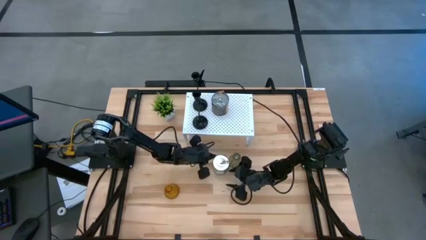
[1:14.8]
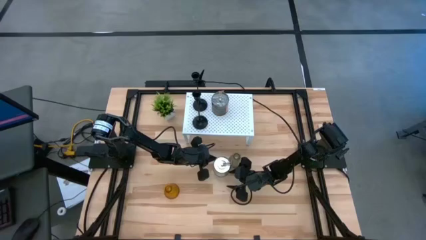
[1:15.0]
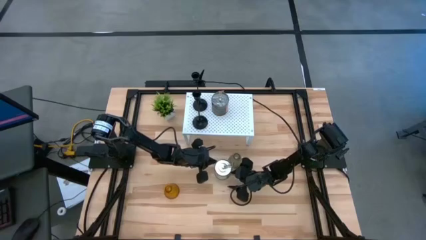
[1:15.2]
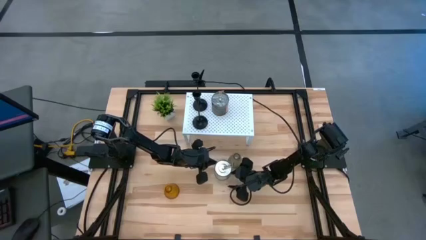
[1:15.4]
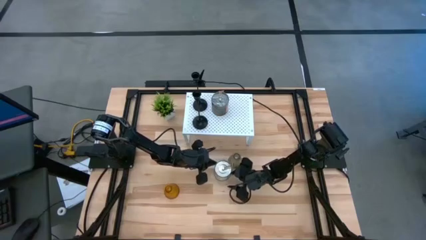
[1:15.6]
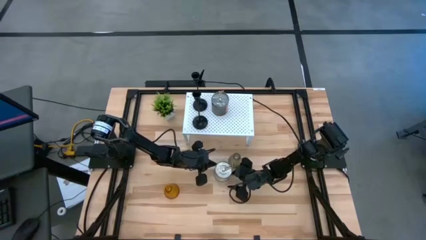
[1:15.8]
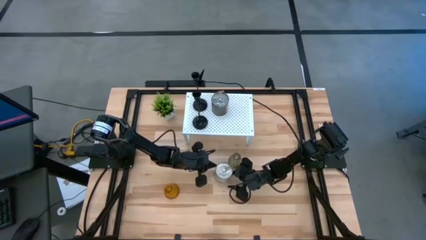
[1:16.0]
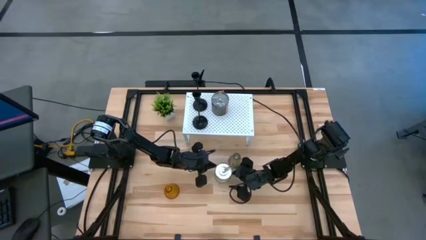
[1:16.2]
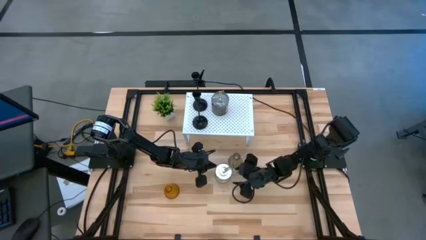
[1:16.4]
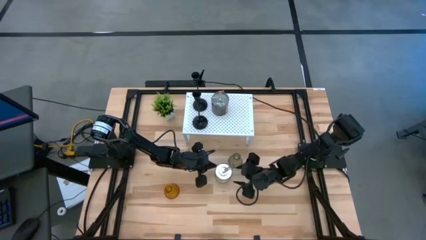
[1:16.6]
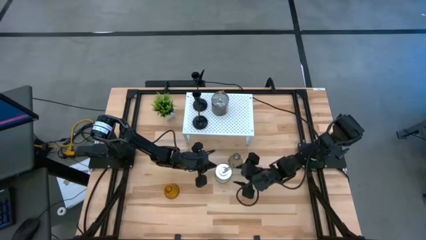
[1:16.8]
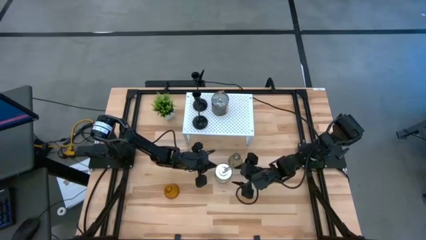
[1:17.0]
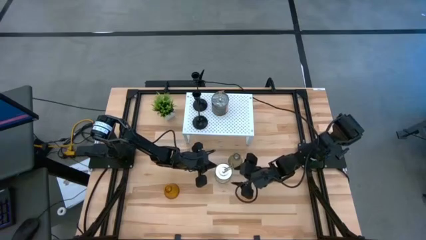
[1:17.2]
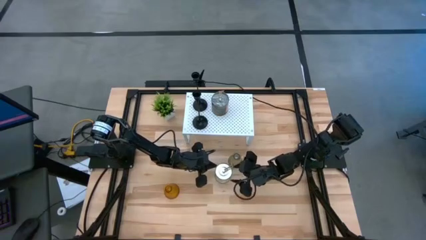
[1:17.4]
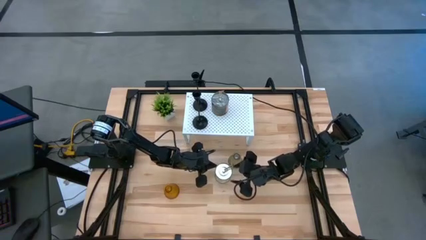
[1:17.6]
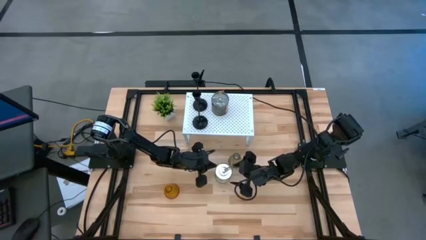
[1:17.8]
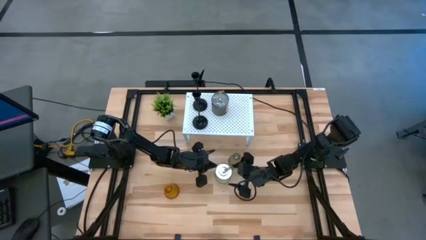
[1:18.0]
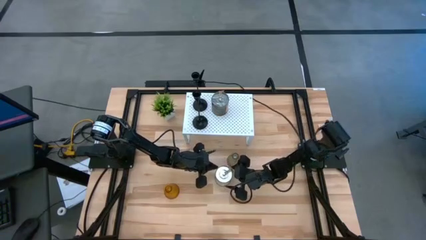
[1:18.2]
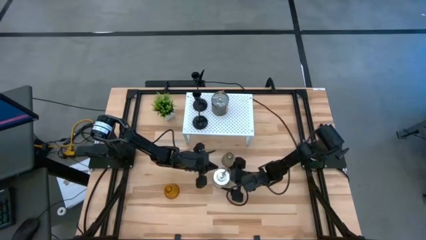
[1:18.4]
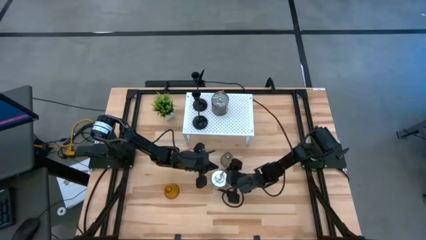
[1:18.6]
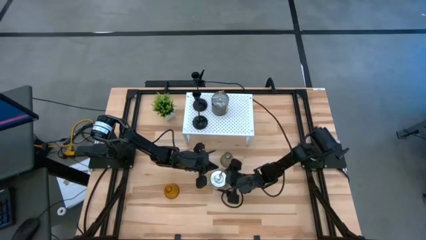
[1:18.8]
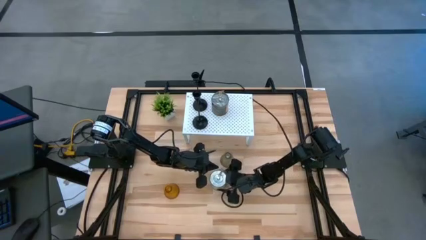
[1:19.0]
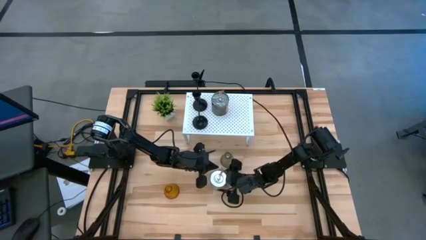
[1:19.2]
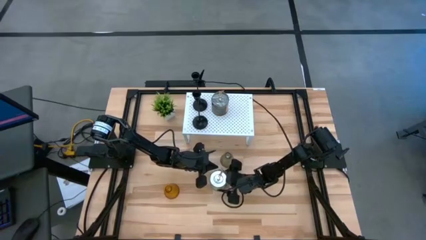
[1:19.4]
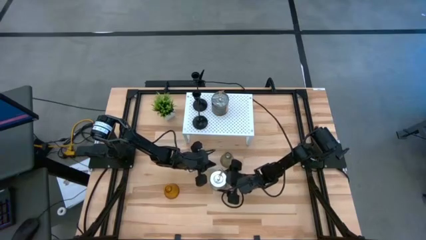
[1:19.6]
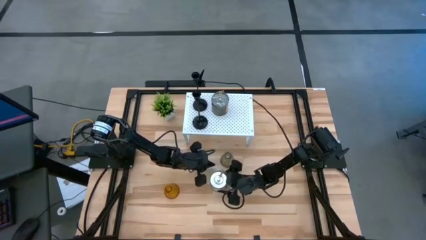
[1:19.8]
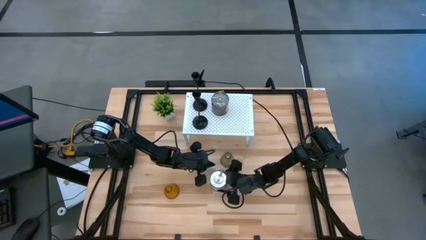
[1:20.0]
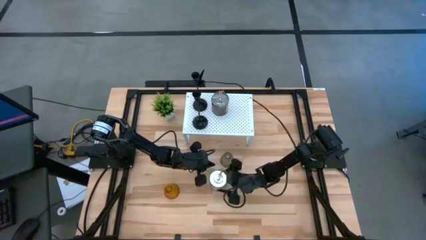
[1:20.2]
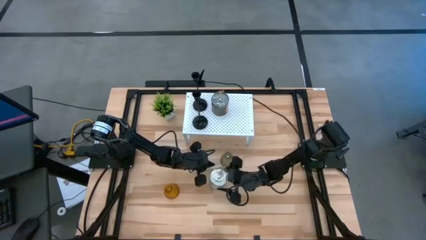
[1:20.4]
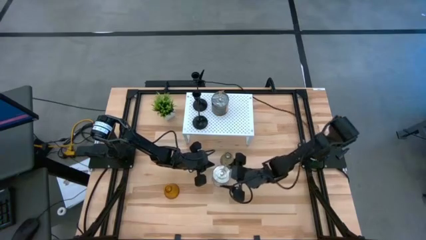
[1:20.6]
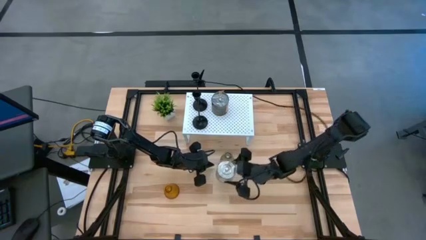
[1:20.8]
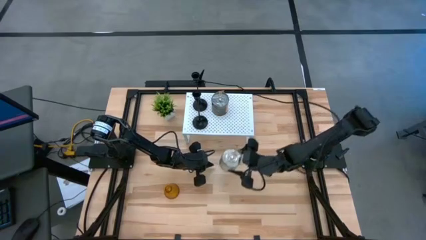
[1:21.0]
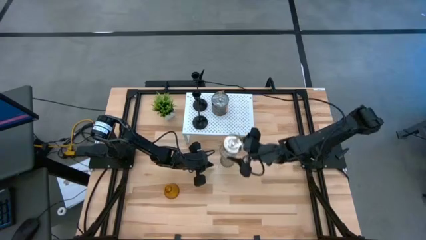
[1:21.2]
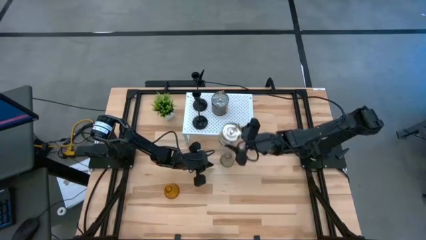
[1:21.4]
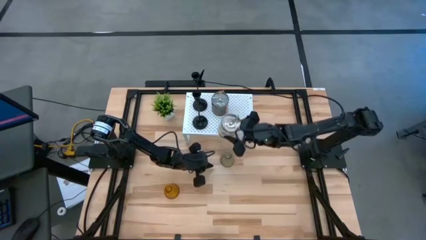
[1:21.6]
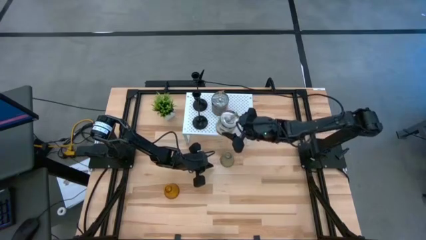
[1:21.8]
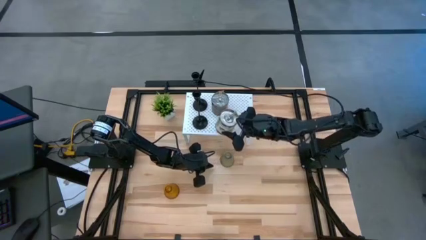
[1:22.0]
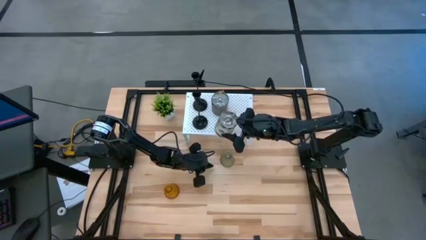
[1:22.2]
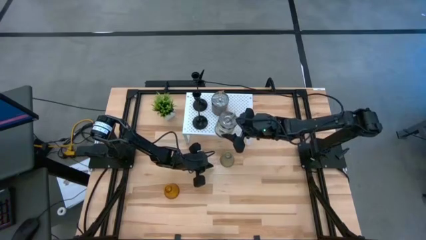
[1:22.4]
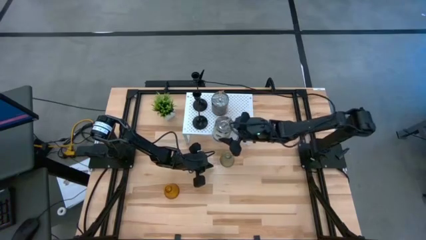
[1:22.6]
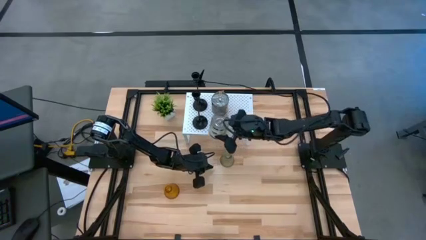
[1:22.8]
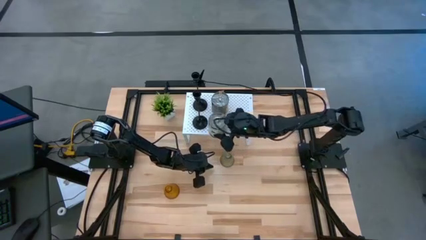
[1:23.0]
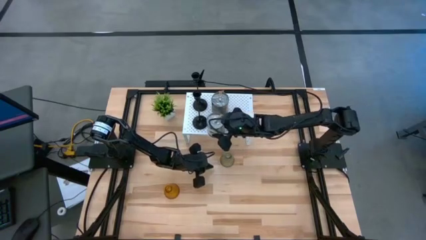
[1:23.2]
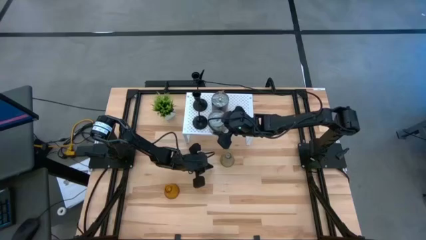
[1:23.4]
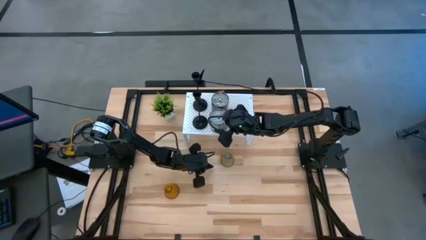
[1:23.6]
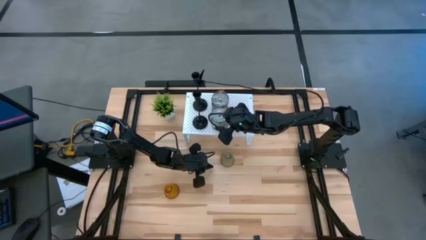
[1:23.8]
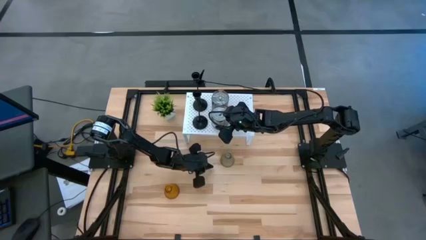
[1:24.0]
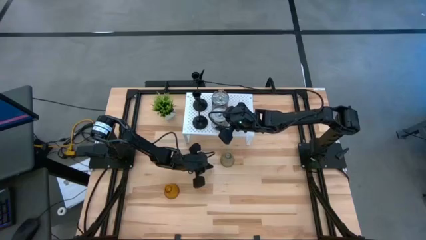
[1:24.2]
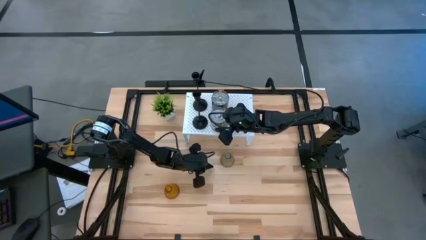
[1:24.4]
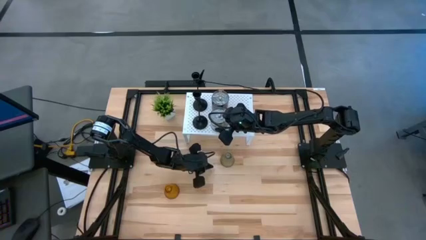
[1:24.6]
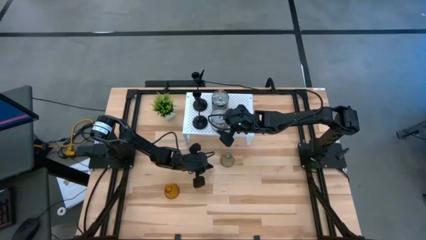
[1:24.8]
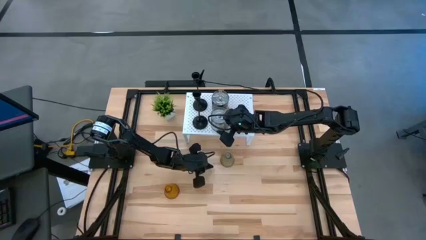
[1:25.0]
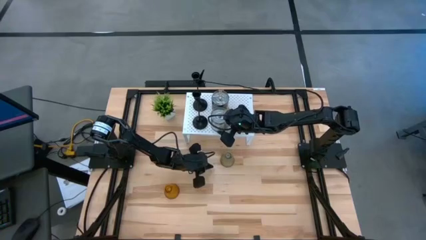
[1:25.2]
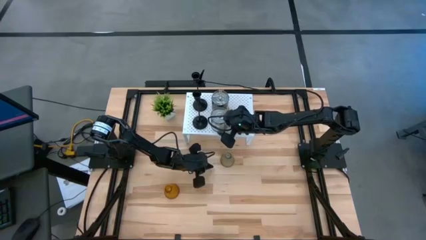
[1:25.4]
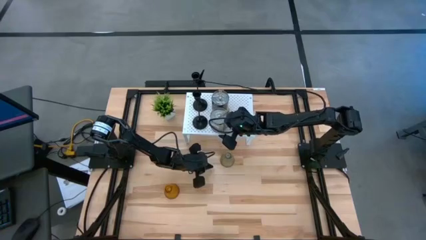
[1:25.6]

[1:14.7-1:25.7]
Task: Pick & Place candle stick holders
Align the silver scented candle can with the other silver scented candle on the shelf

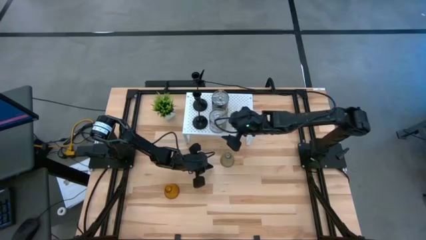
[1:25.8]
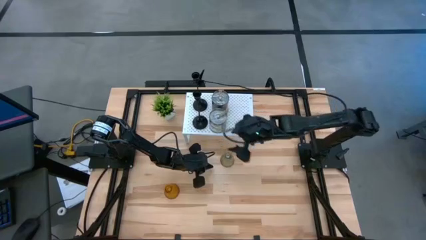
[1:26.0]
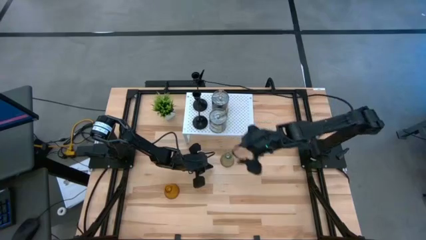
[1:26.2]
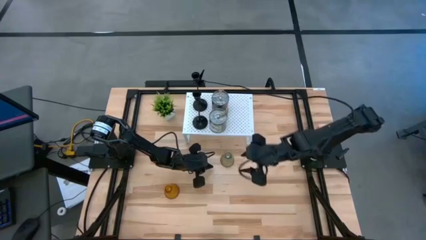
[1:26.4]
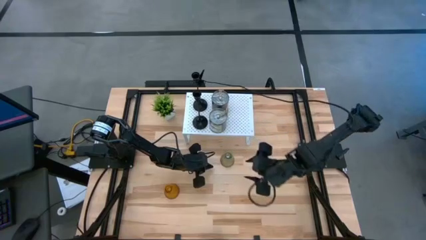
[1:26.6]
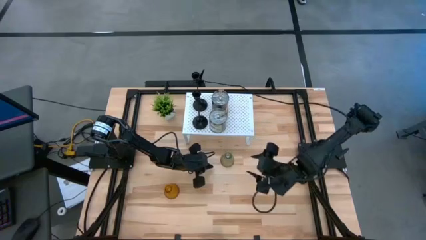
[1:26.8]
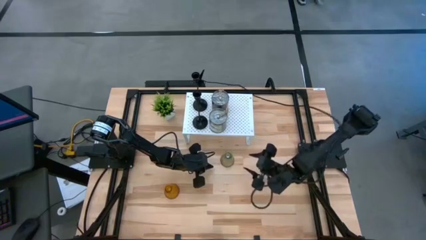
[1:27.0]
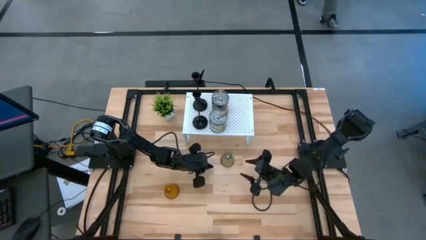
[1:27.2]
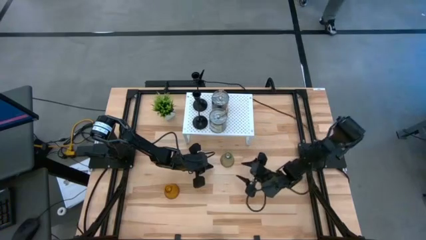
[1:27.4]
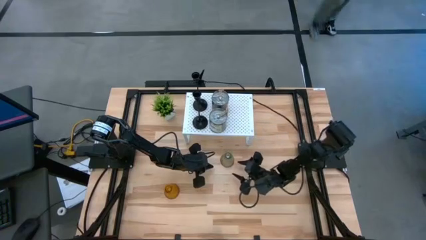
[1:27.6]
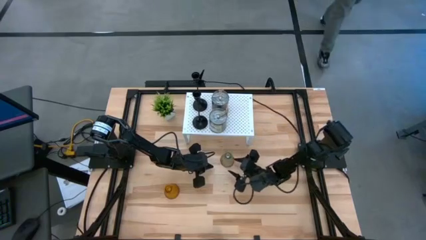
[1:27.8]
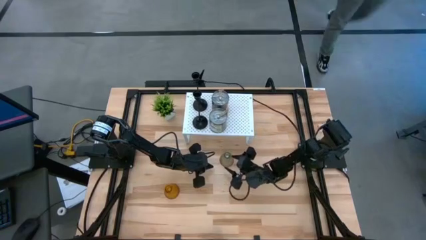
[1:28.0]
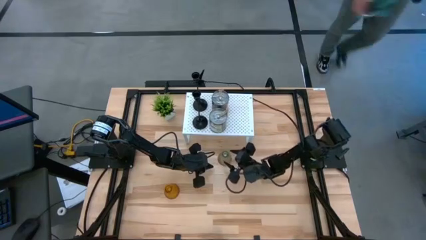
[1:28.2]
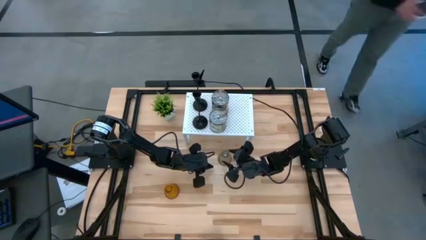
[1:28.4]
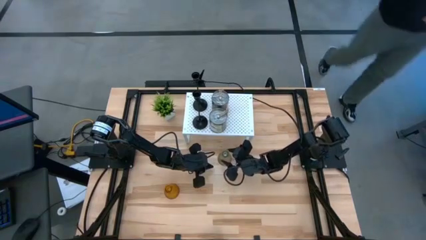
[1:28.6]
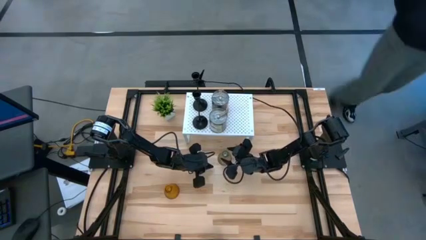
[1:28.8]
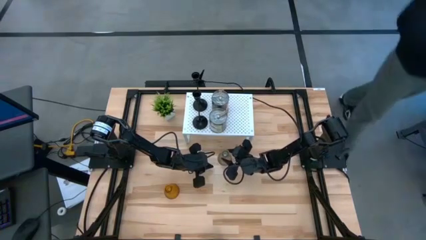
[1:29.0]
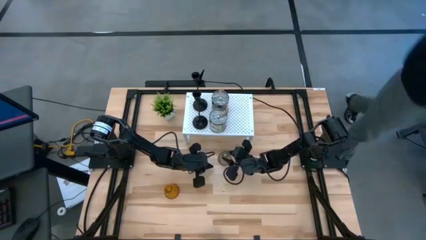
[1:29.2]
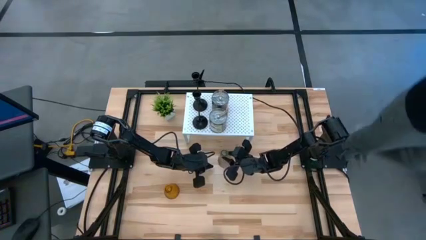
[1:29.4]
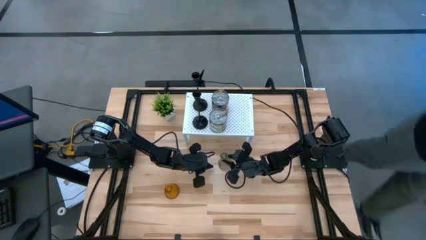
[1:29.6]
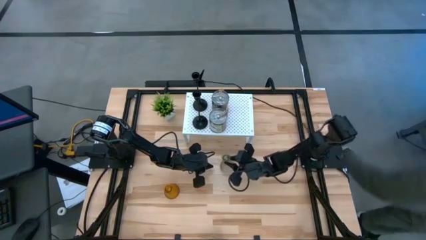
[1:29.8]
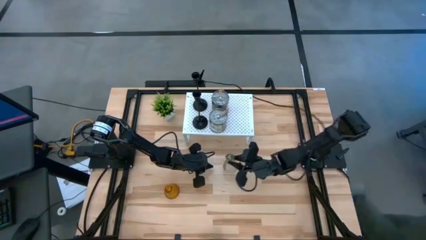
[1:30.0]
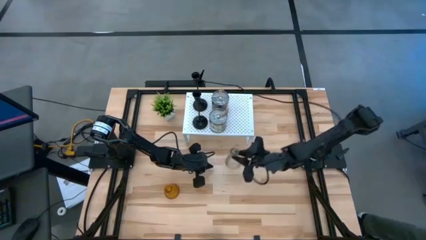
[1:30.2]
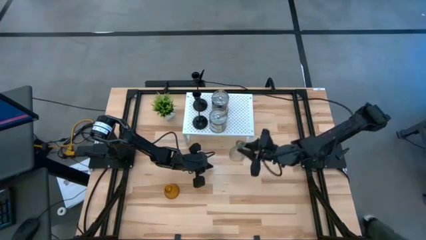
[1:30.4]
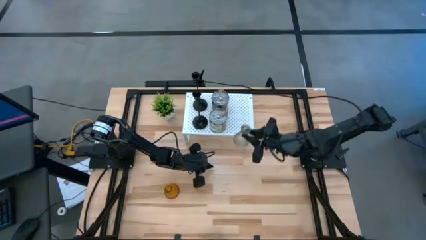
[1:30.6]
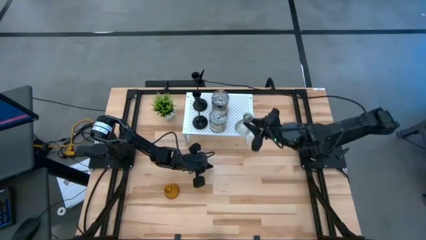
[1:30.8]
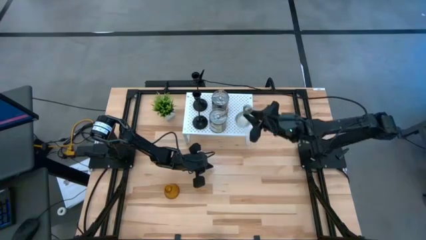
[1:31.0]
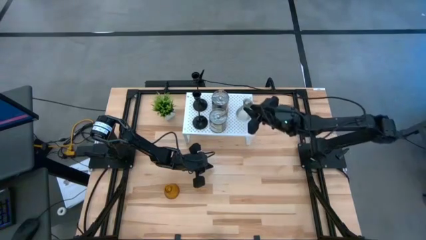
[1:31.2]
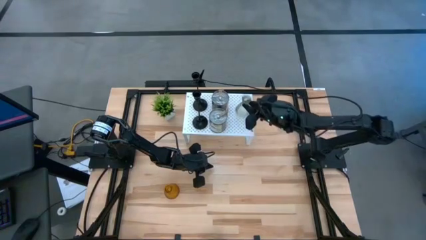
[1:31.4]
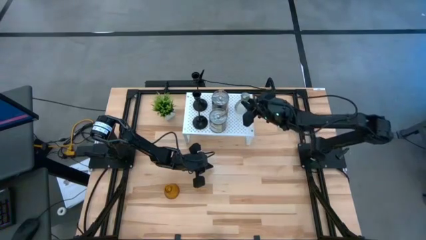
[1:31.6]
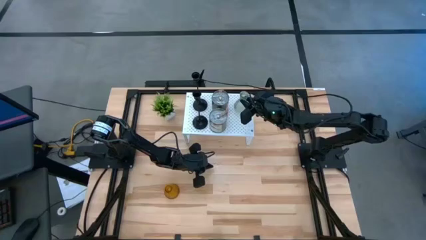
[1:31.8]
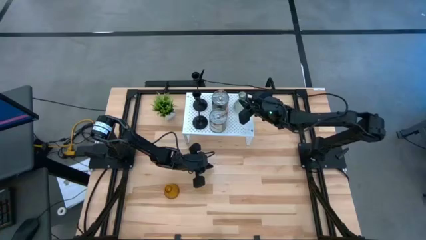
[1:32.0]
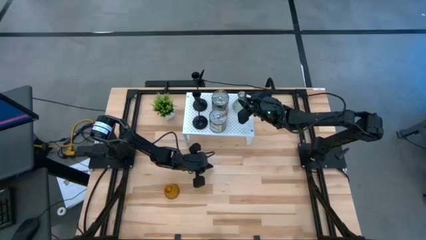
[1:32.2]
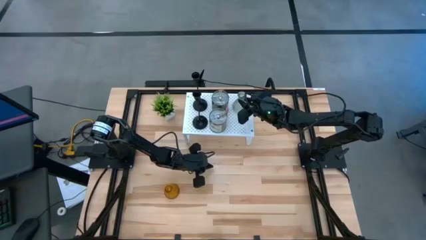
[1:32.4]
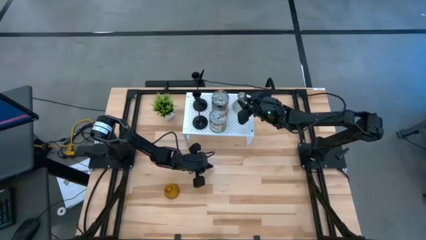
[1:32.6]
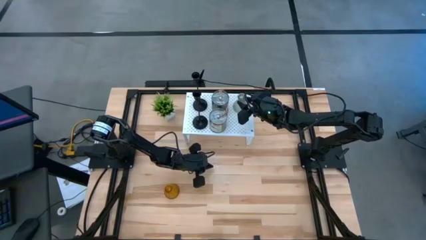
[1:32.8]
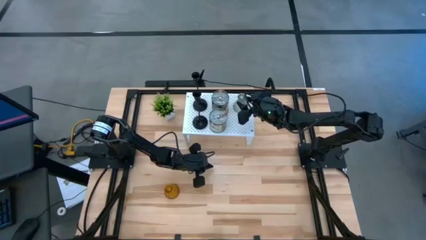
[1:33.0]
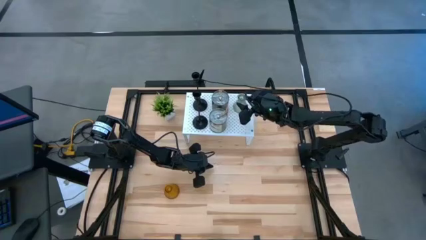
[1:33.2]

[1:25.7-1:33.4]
Put the green glass candle holder on the shelf
